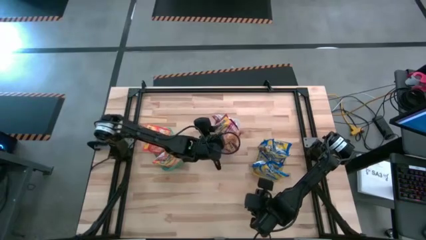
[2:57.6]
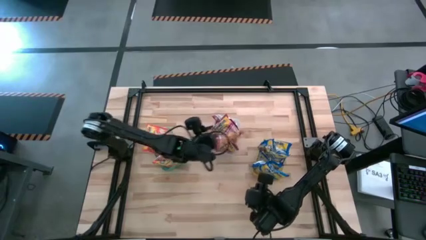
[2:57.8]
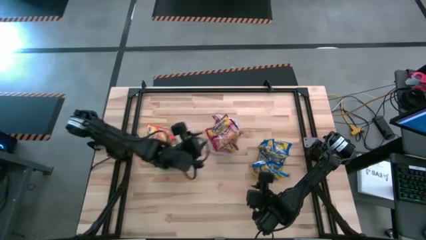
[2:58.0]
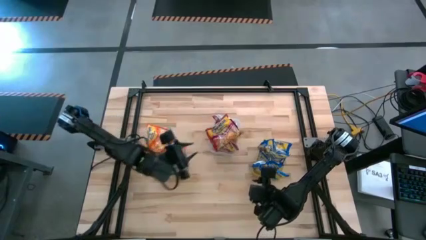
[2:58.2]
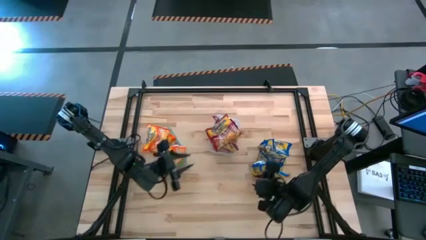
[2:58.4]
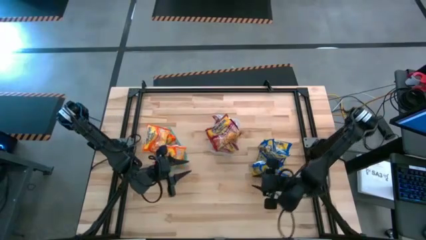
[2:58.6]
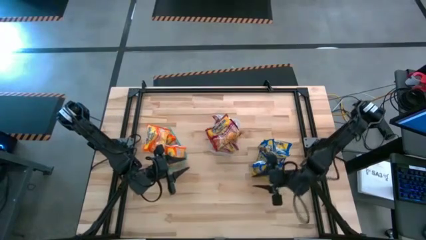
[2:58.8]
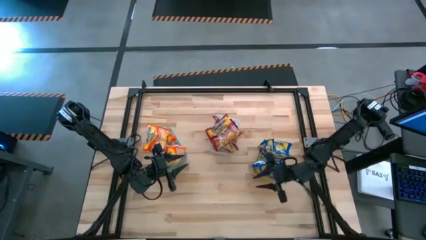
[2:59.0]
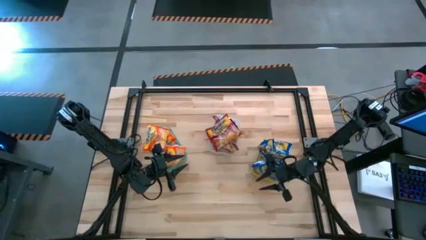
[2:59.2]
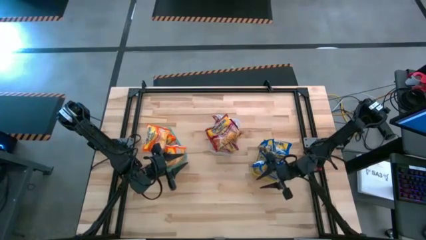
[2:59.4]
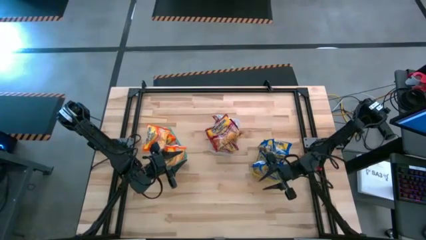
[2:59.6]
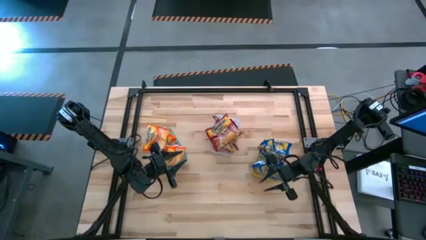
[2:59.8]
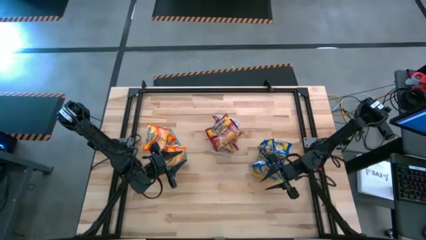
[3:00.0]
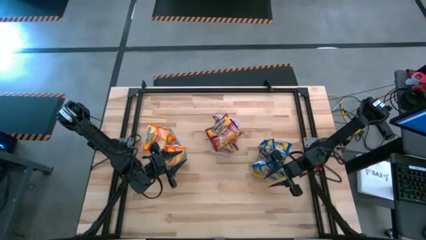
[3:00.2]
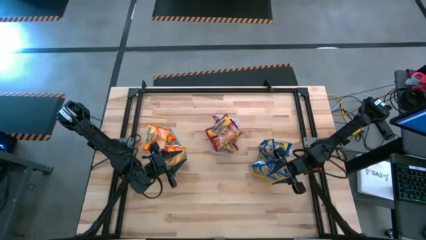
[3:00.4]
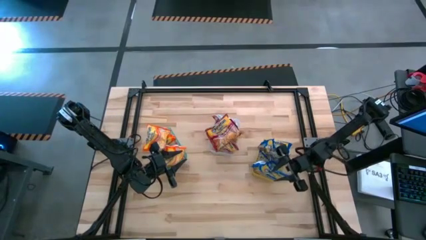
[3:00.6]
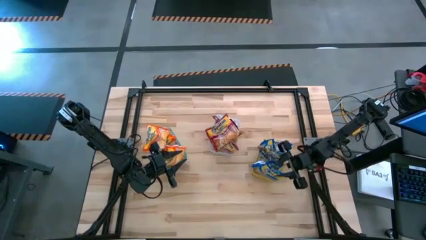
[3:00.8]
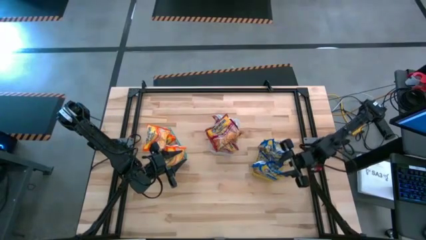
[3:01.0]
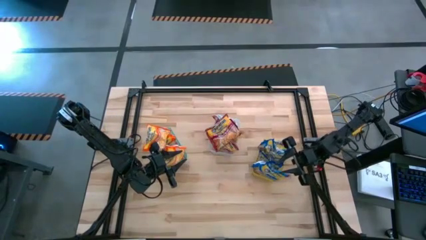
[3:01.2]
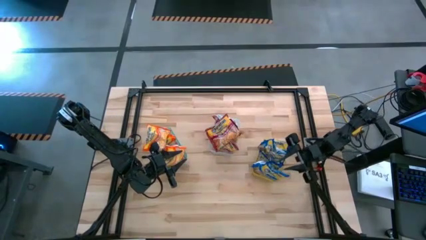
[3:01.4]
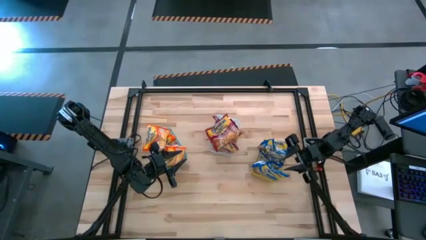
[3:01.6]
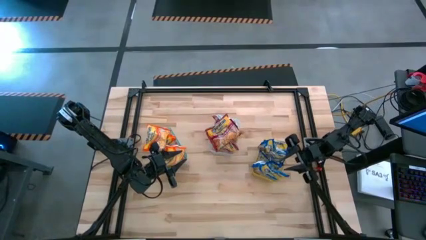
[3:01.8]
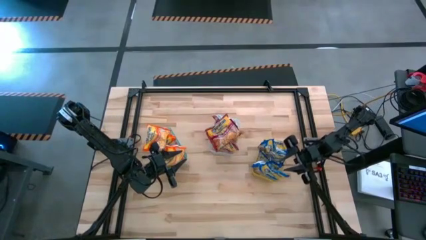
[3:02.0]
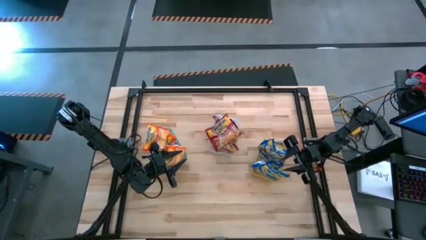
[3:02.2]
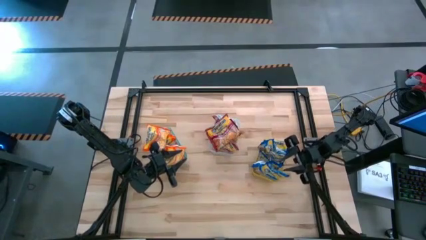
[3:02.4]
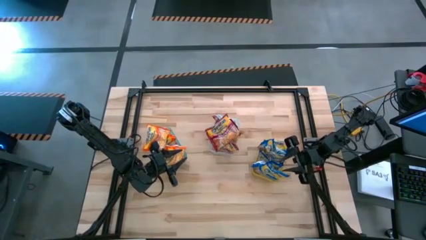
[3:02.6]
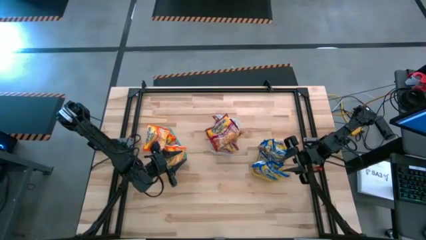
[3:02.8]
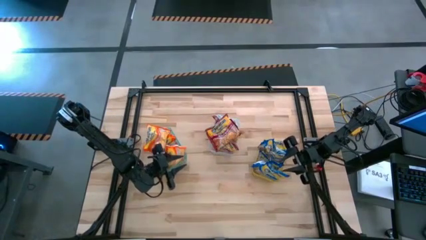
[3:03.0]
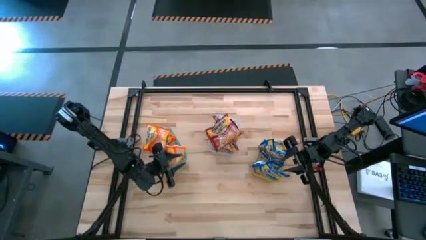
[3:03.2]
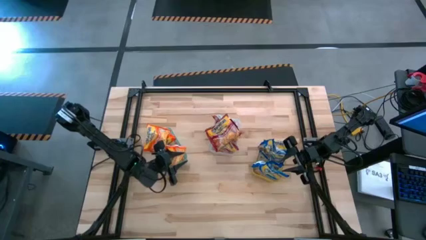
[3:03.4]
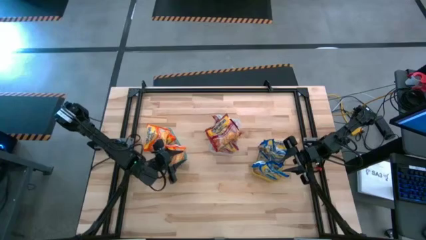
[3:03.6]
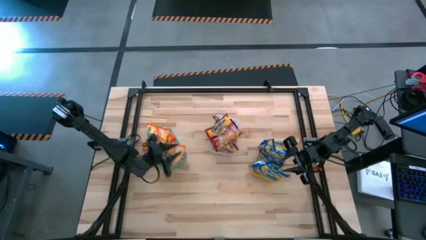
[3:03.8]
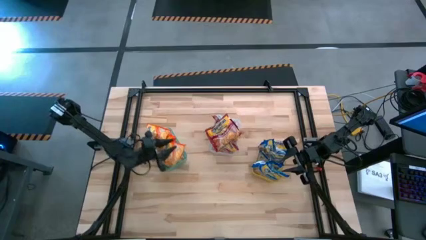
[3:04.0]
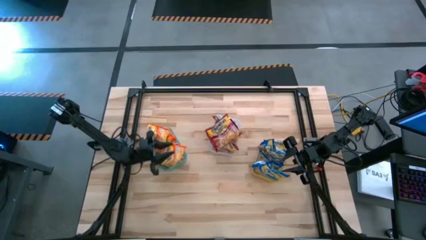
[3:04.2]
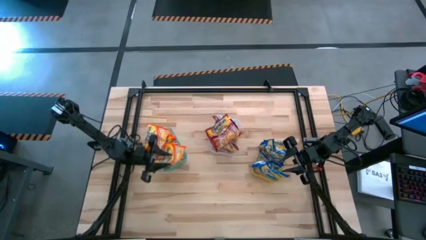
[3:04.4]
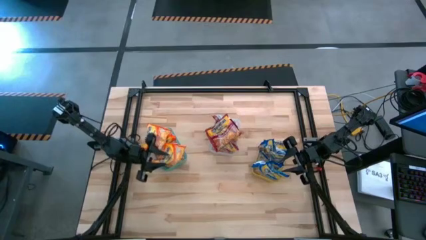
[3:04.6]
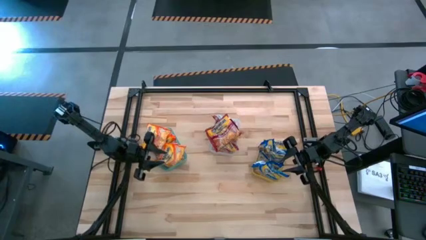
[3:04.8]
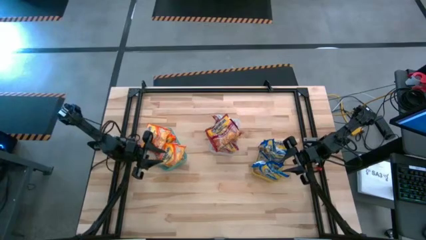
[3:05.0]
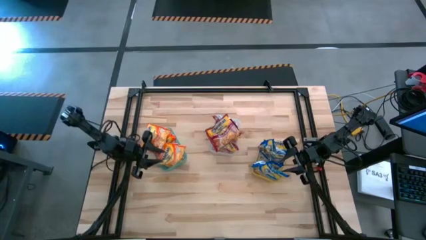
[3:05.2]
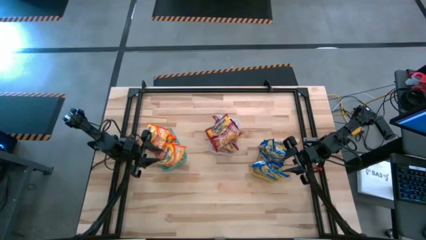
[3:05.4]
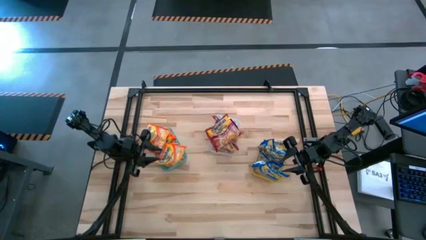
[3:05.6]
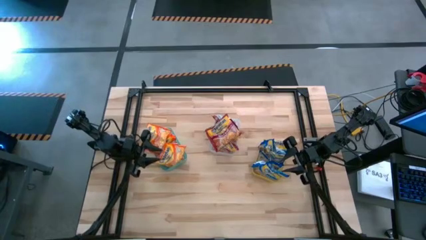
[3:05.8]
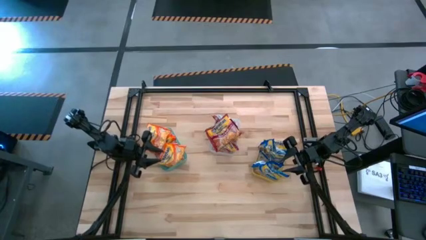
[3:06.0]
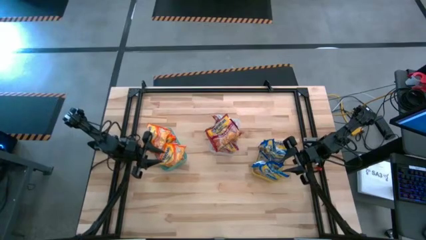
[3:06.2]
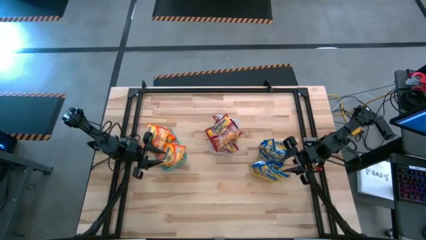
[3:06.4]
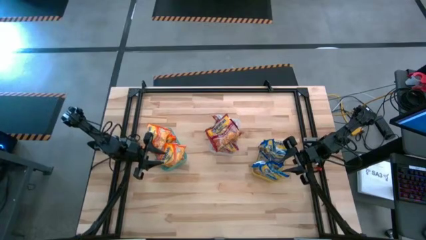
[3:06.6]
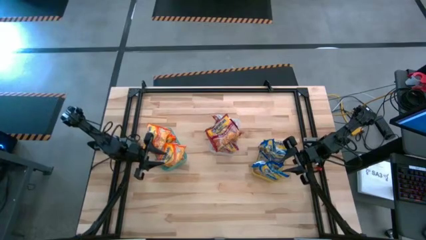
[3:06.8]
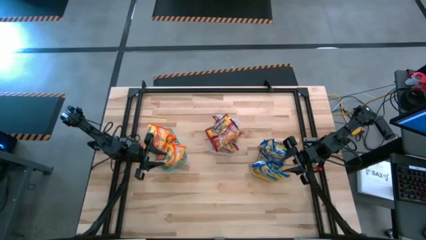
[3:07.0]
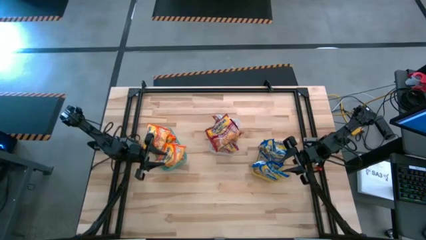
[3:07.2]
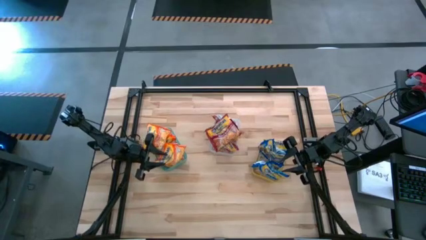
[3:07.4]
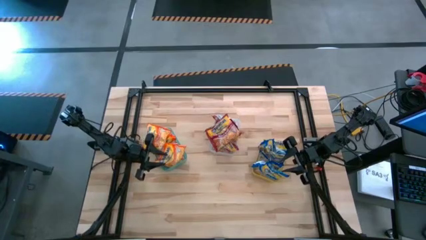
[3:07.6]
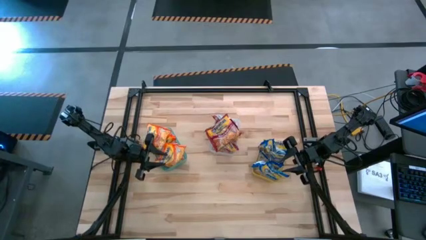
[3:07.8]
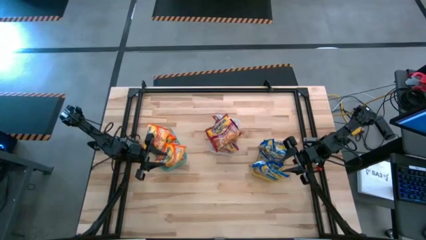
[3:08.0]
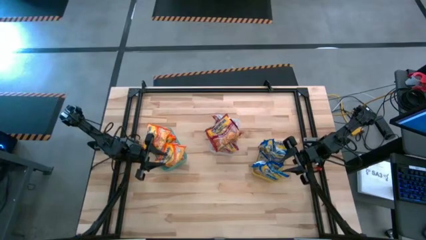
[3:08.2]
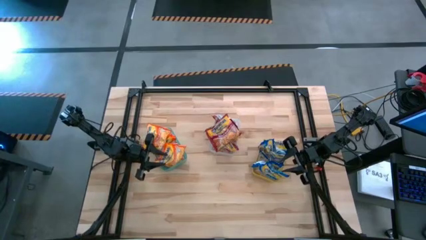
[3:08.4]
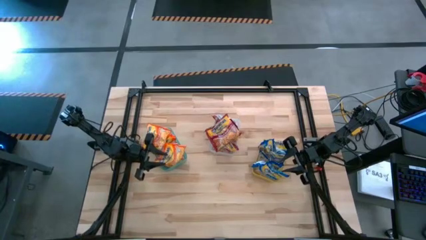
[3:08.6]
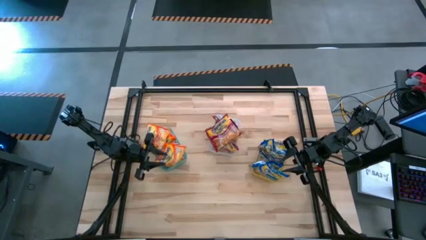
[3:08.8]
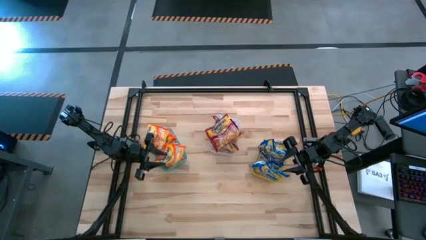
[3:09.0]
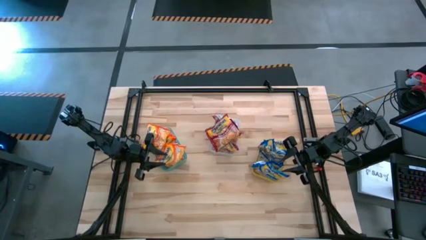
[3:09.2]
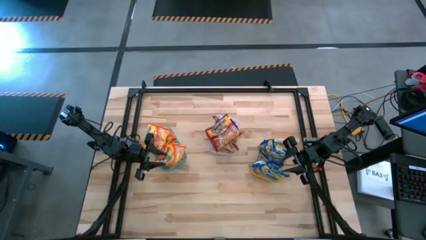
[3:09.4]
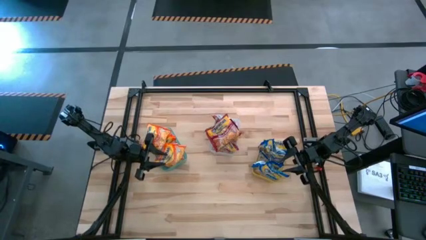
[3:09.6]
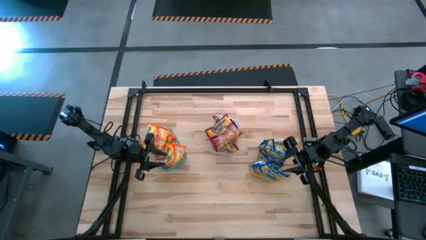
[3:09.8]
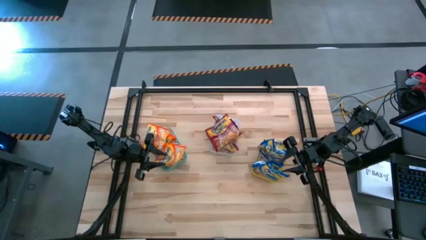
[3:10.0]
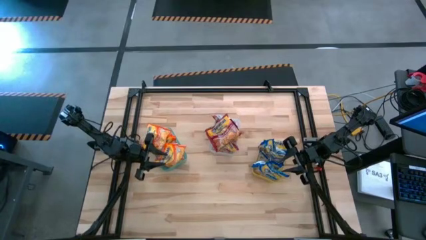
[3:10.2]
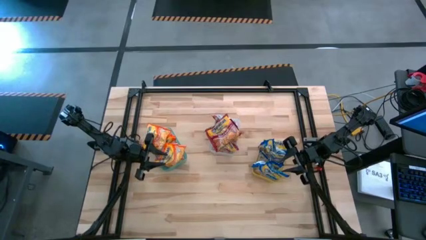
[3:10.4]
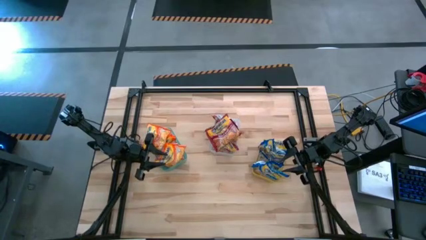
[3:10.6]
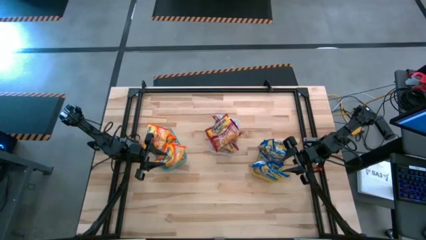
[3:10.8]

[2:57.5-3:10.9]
Task: Sort Maruchan noodles
Return to Home Position

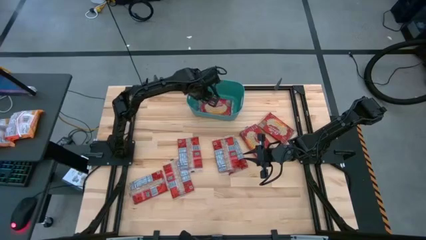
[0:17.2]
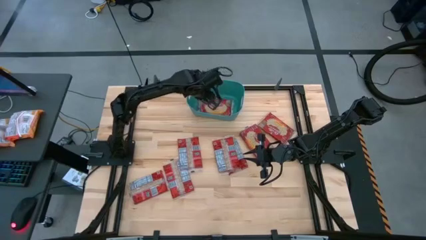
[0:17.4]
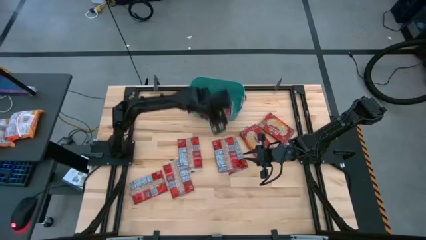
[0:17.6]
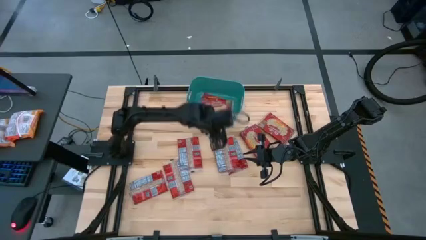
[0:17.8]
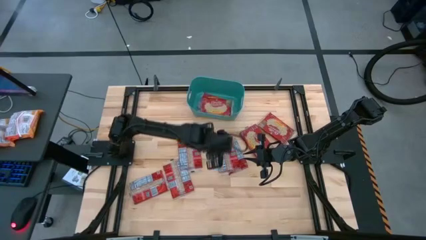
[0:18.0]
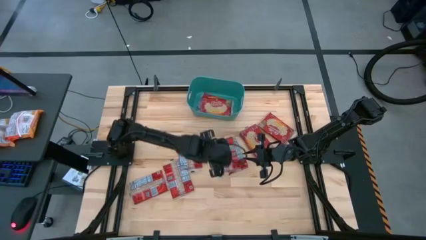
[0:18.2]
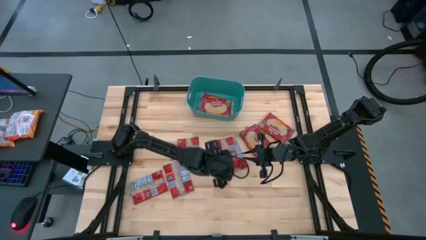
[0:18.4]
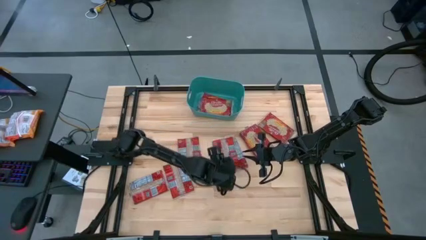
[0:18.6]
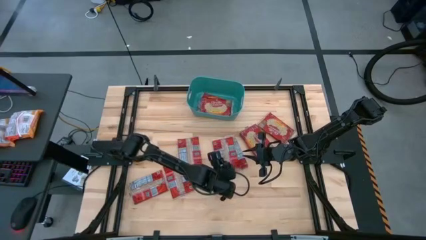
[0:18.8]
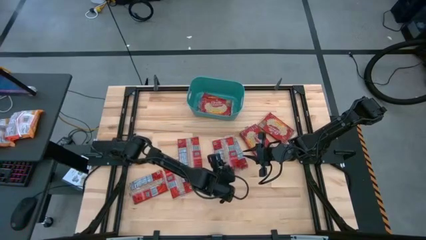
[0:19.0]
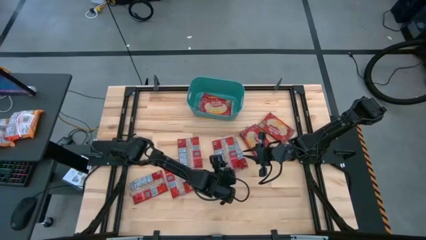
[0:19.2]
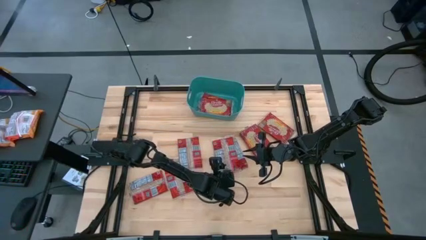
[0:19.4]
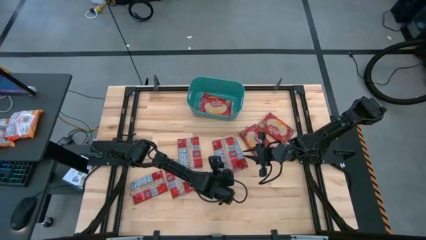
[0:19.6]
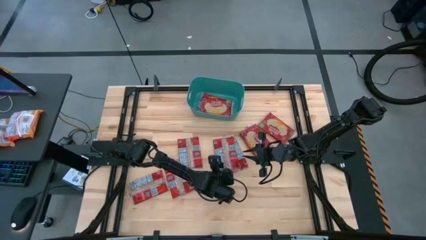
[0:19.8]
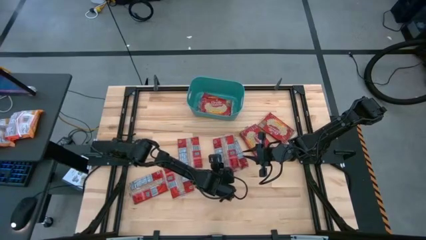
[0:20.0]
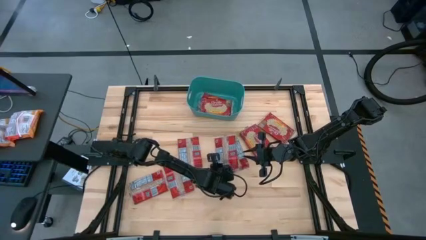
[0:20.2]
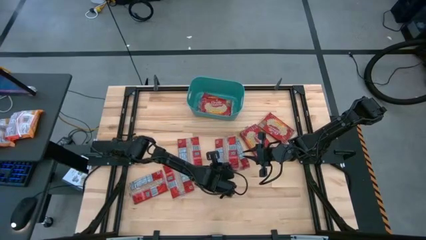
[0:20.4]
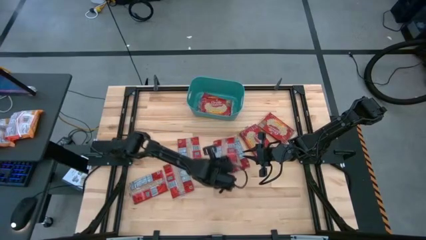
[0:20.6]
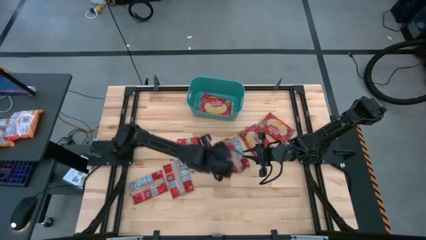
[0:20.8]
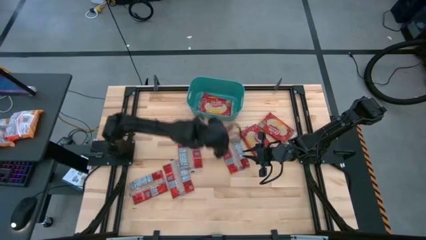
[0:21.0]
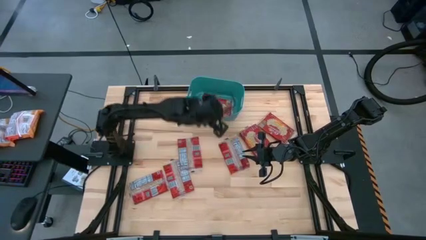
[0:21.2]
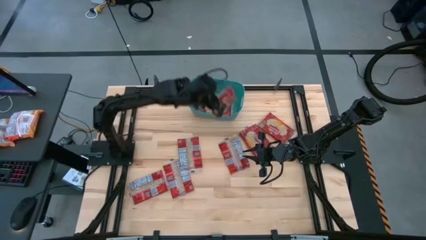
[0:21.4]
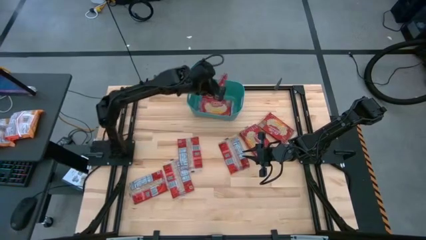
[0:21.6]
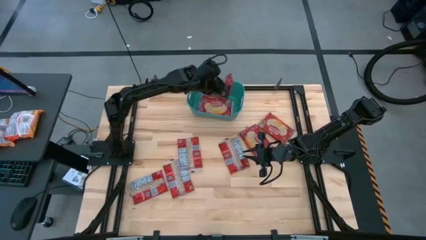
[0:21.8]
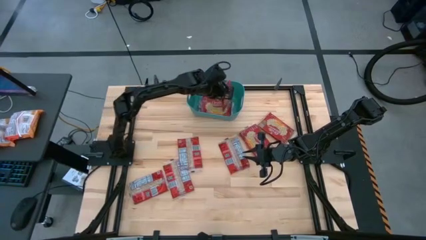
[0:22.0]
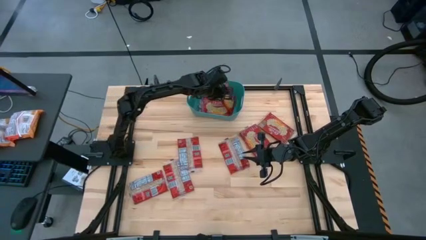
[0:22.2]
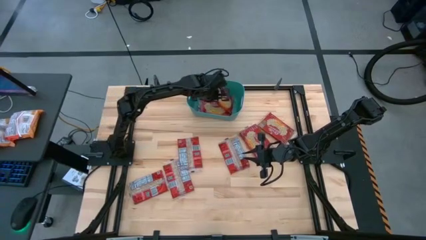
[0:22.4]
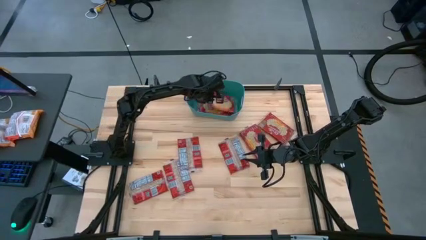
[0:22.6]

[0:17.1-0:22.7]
Task: Sort popcorn bags into baskets
Put the red popcorn bag into the green bin
